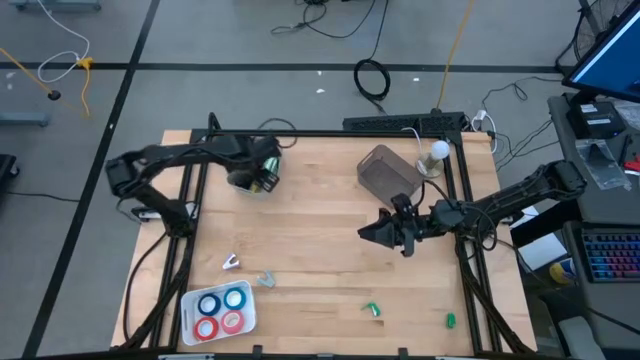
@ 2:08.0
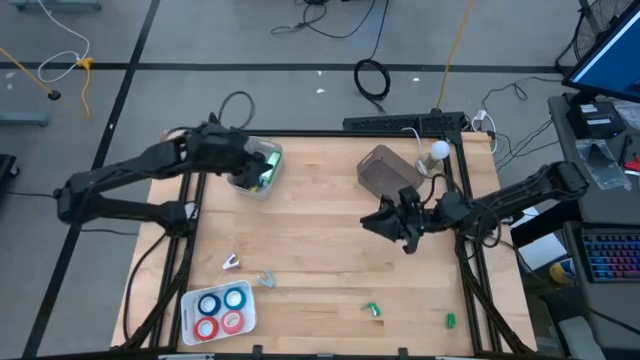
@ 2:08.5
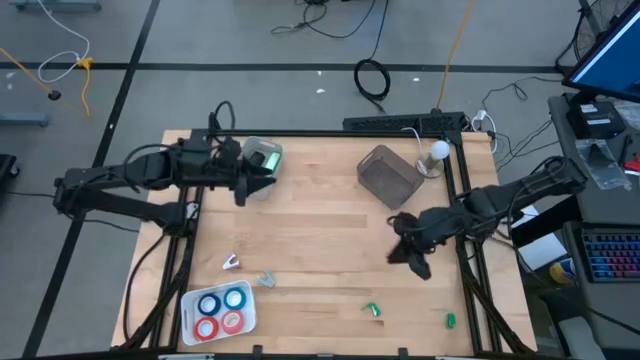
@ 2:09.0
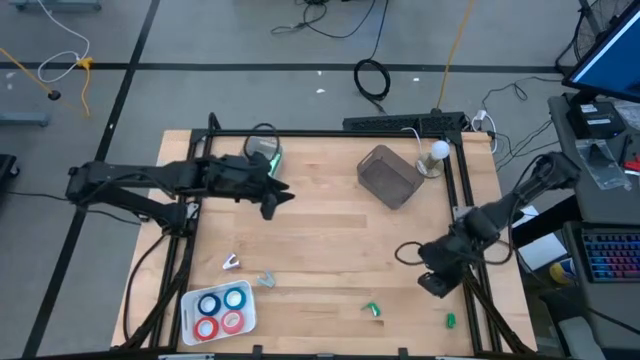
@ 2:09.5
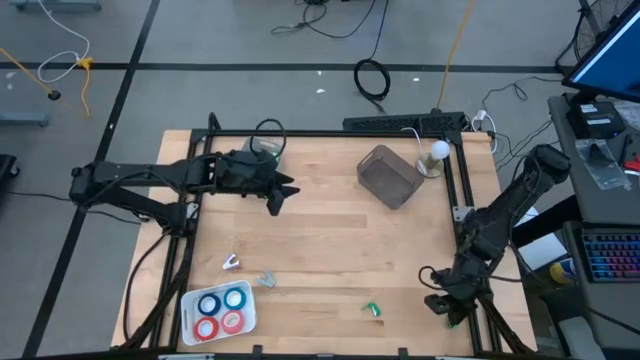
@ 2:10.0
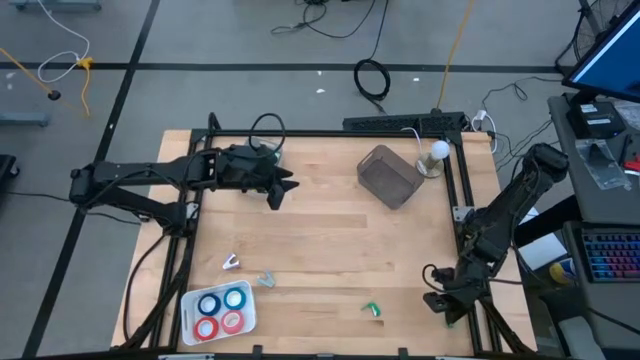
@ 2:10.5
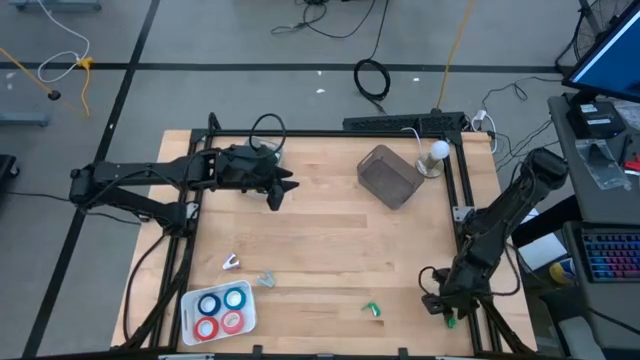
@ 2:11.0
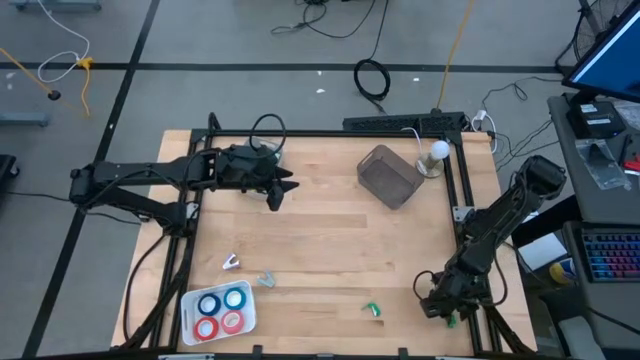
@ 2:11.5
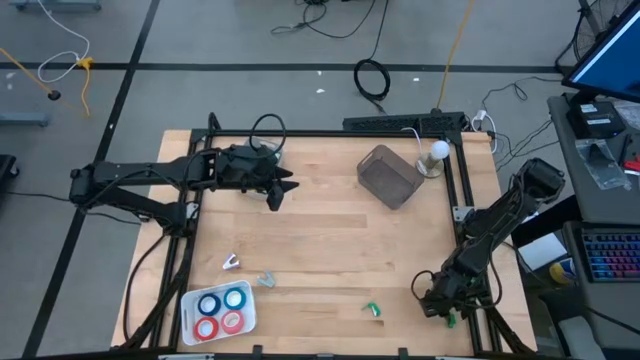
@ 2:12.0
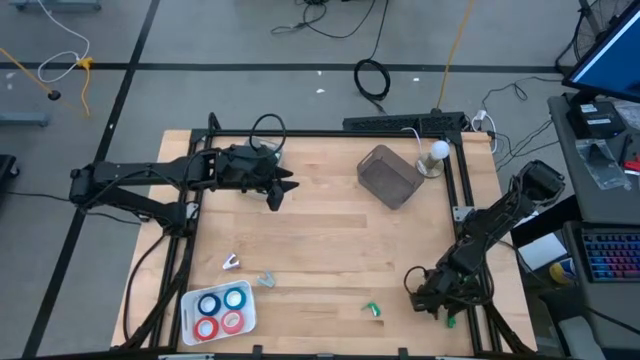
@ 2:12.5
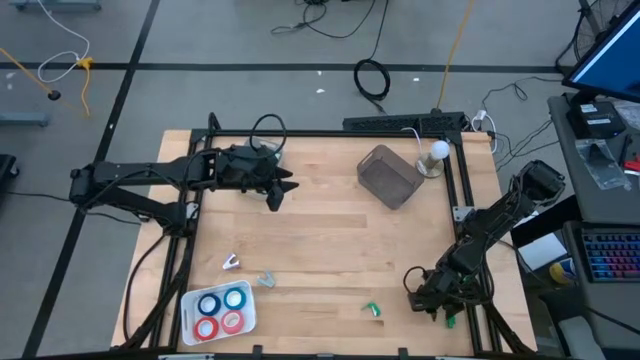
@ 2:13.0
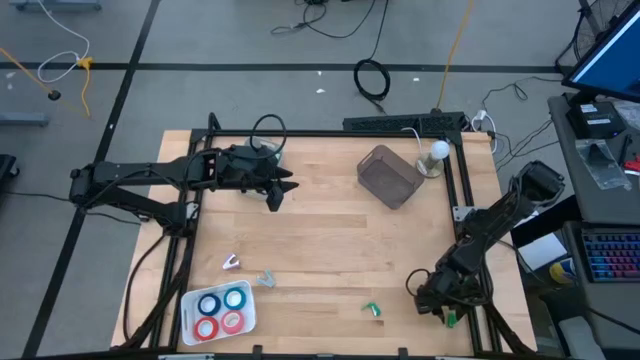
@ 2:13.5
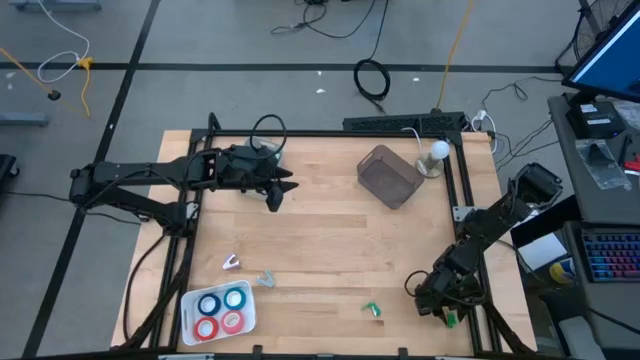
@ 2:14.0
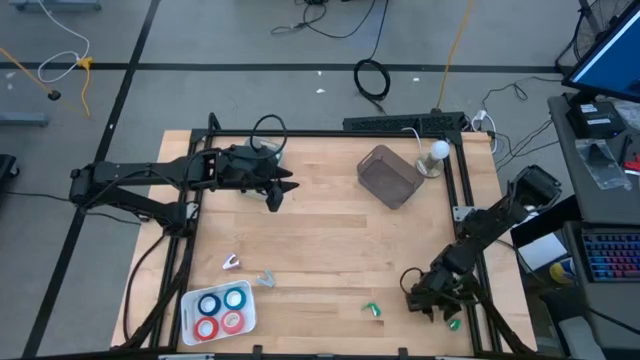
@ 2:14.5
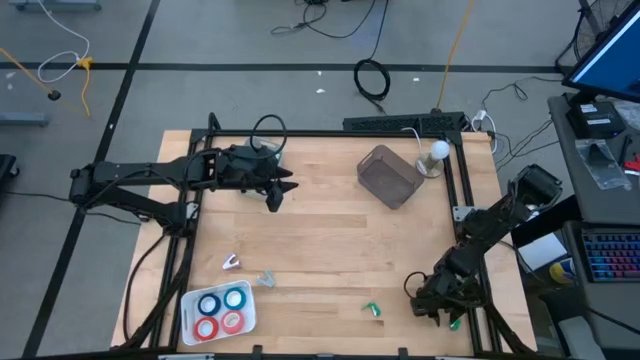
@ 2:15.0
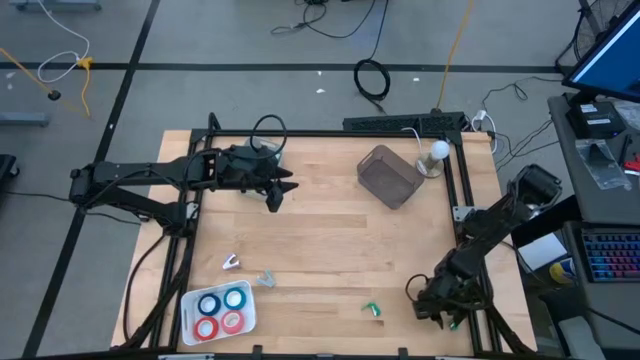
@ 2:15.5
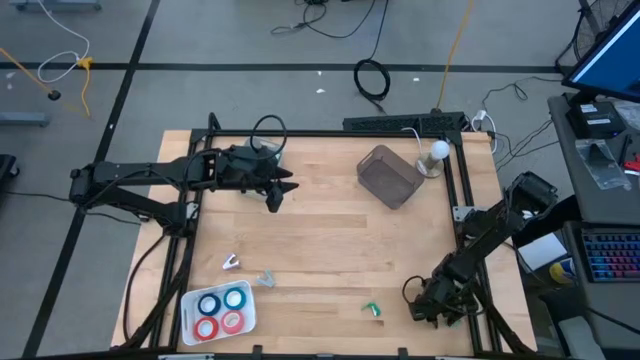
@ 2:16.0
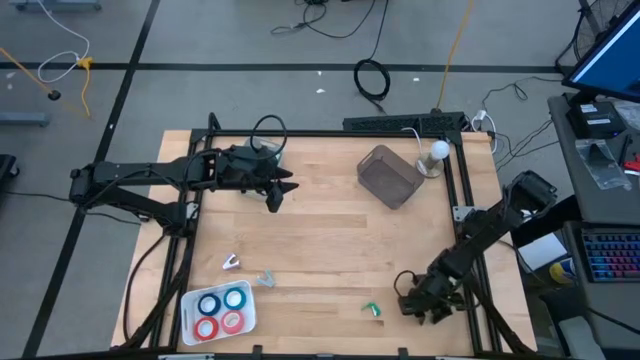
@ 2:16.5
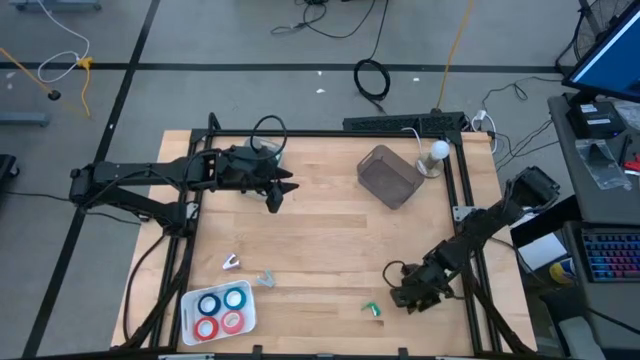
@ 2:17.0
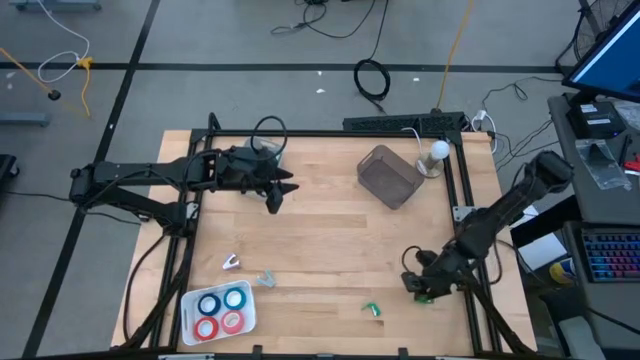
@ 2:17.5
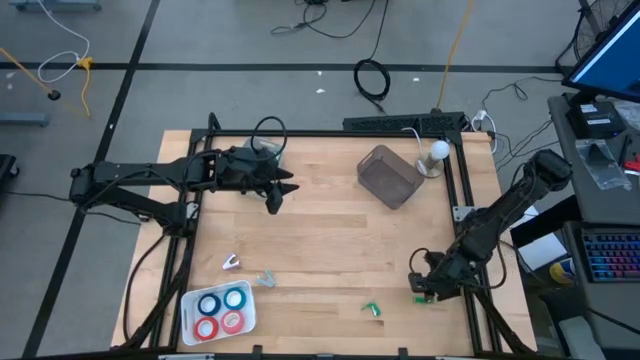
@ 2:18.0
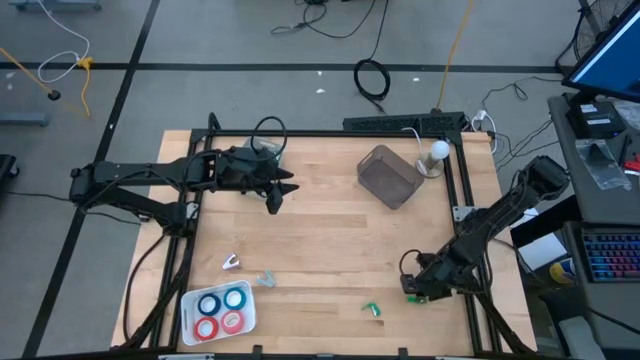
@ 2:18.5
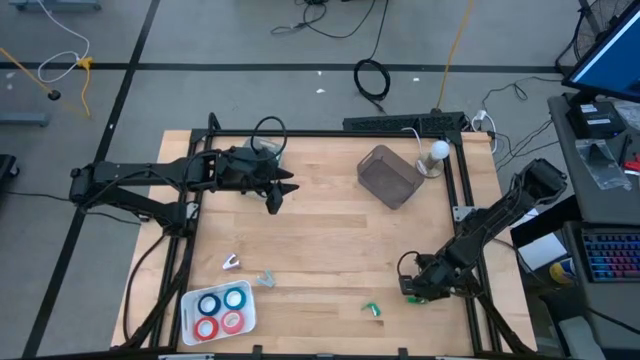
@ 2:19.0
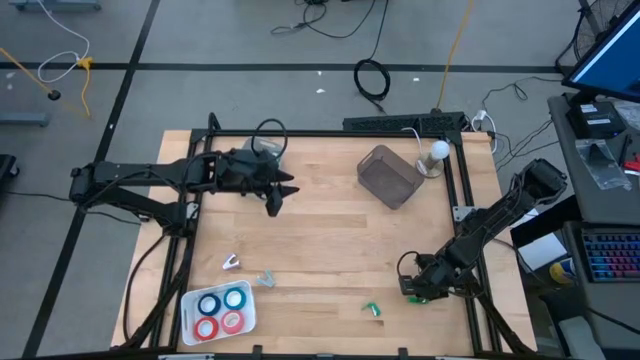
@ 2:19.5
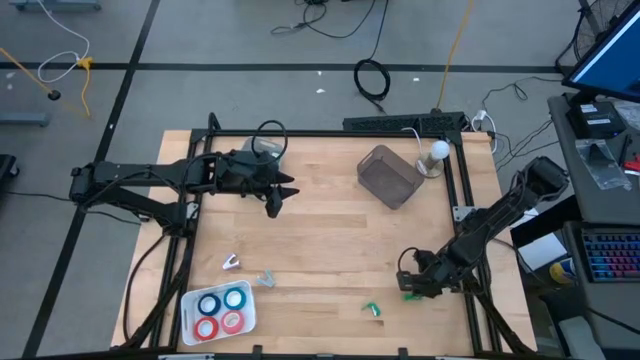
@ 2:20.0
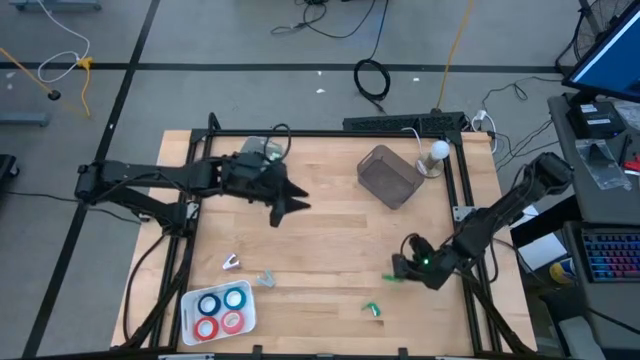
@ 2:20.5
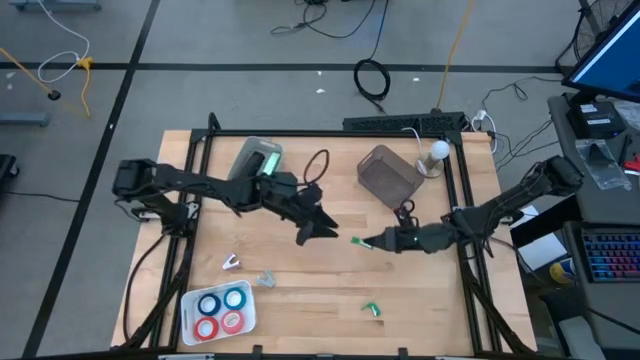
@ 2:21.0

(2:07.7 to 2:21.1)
Task: Pick and place Stapler, Stapler remover, tape
Put the right green stapler into the gray bin

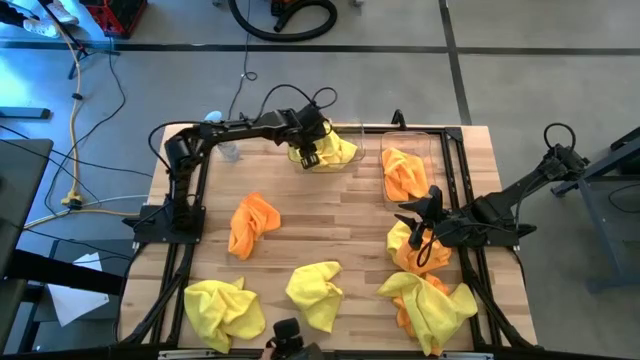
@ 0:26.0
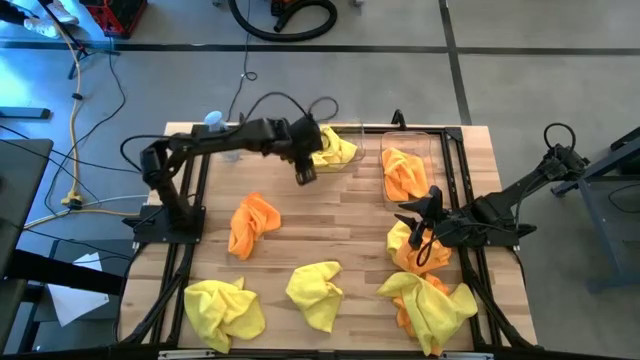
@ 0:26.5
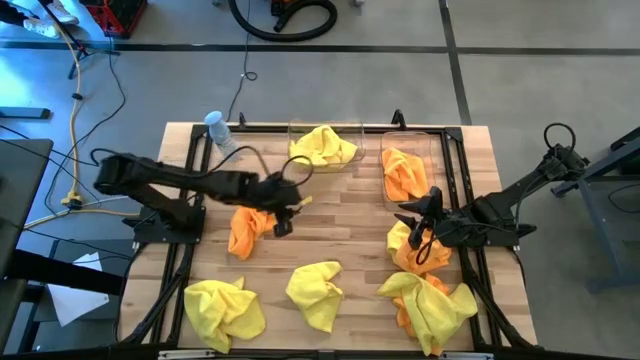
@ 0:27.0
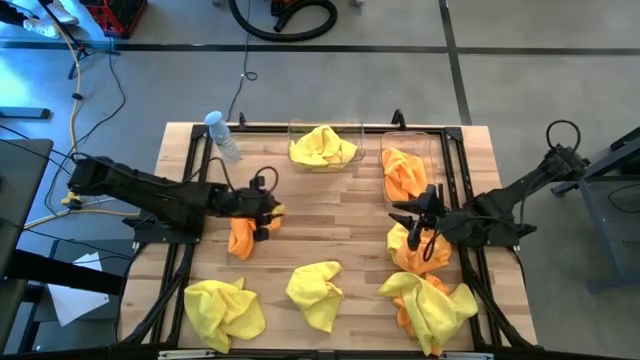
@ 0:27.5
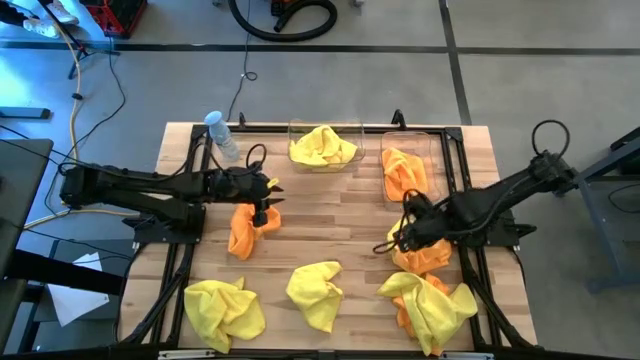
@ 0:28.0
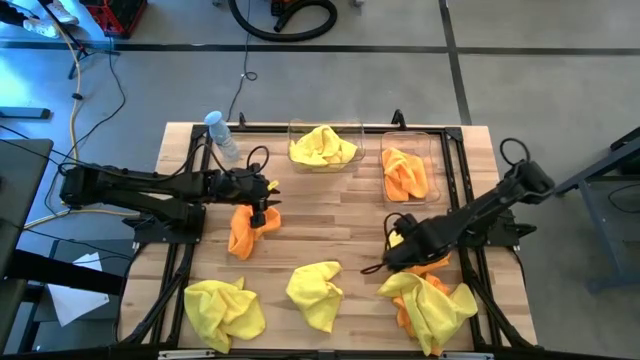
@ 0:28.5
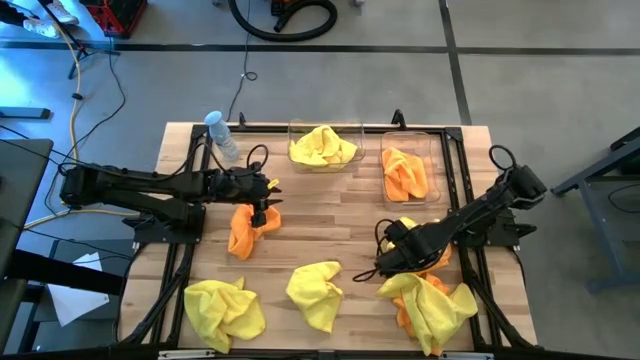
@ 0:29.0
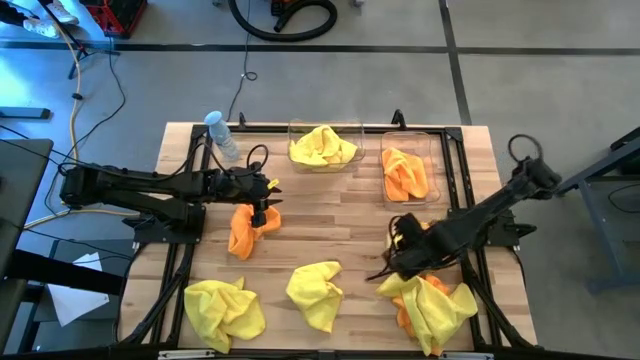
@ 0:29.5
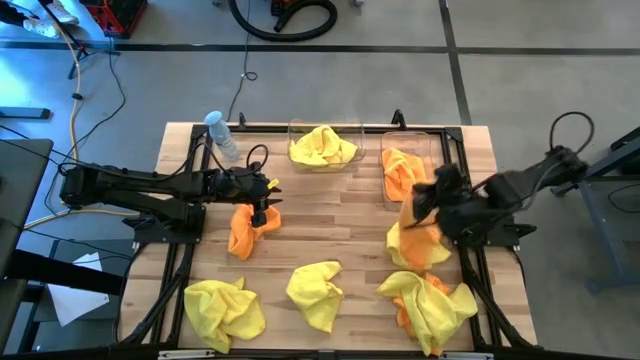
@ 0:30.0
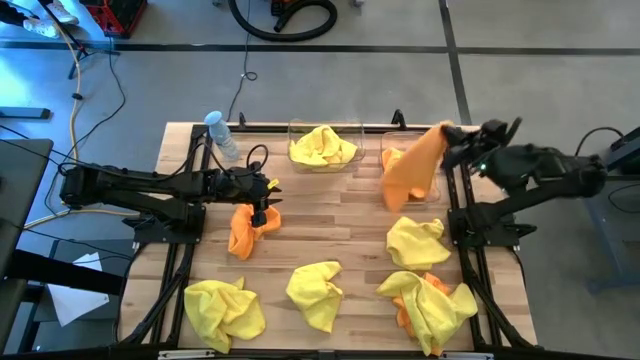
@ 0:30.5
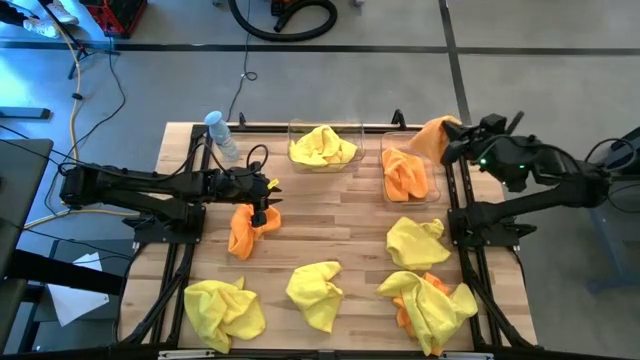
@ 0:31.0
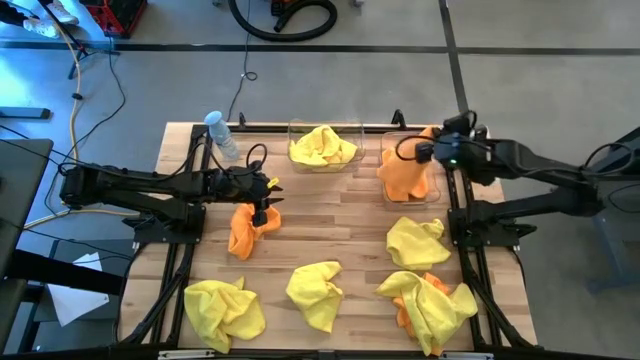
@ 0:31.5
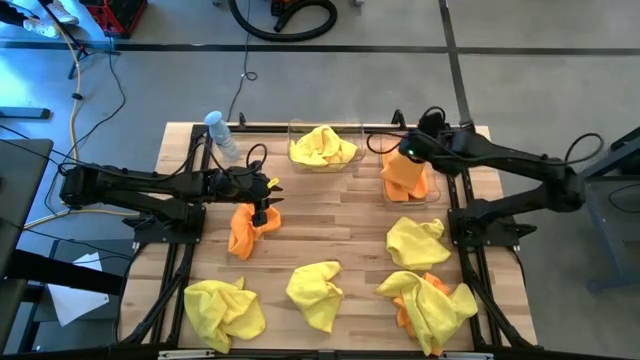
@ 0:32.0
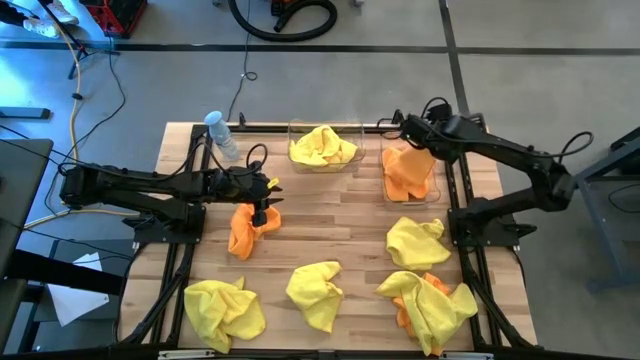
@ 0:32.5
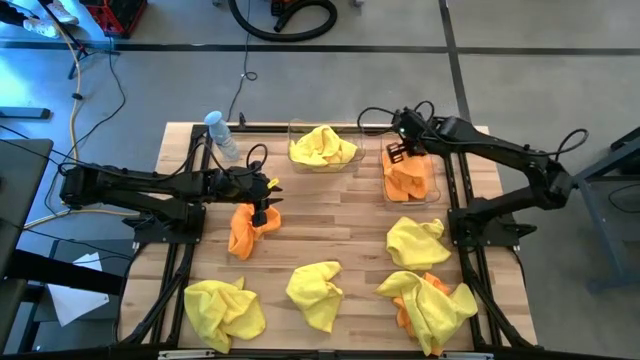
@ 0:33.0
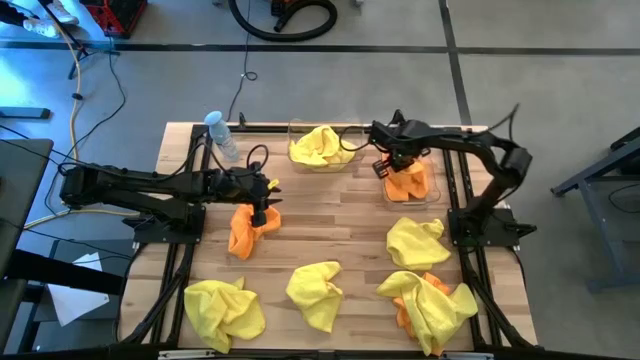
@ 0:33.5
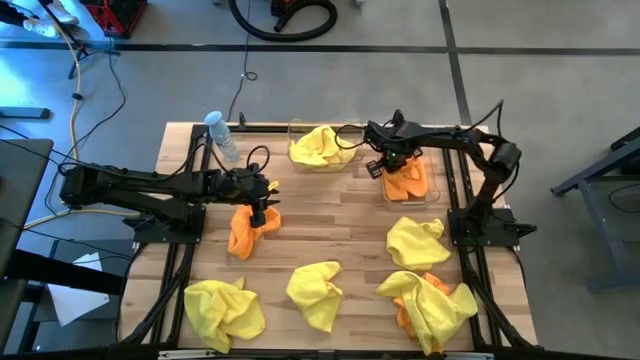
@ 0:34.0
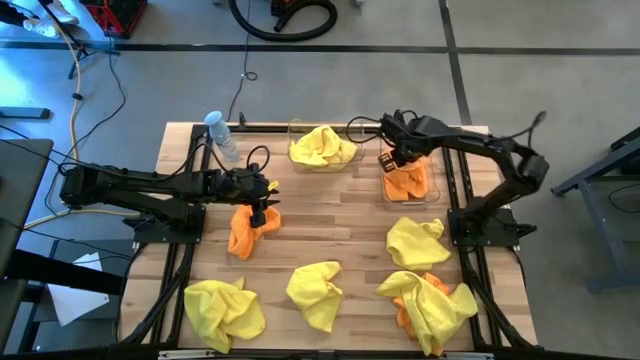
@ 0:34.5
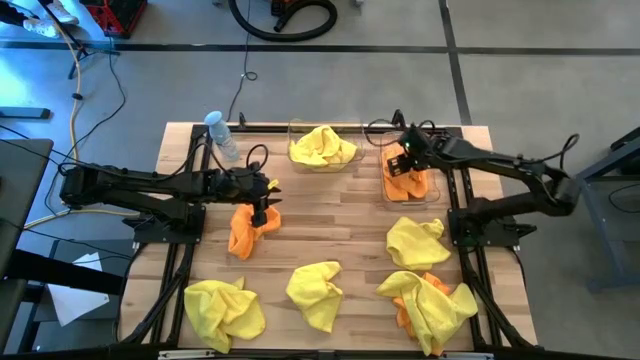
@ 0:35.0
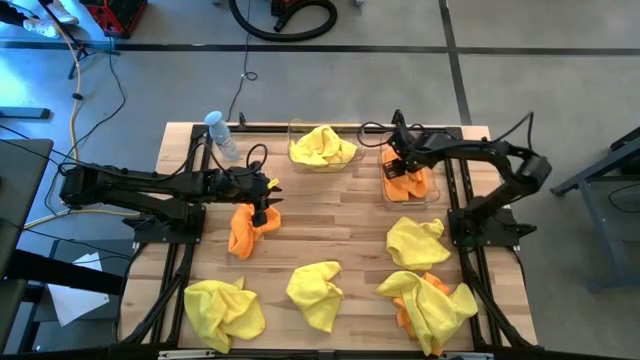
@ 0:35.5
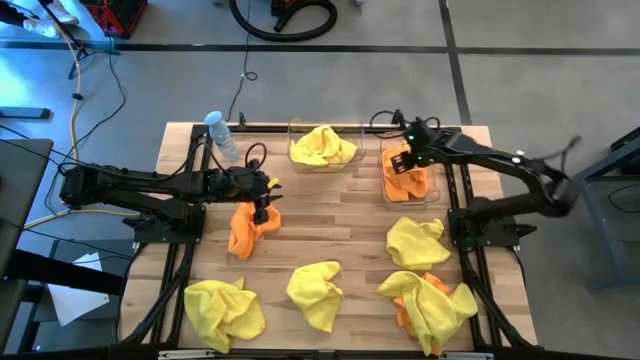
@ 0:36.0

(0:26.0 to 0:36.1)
Task: Sort microfiber towel by color & place in baskets
Put the orange microfiber towel into the right transparent bin
